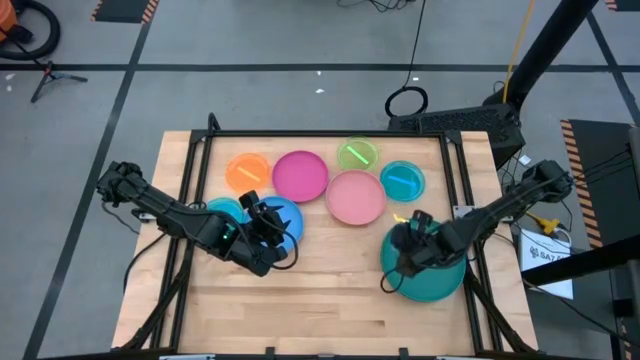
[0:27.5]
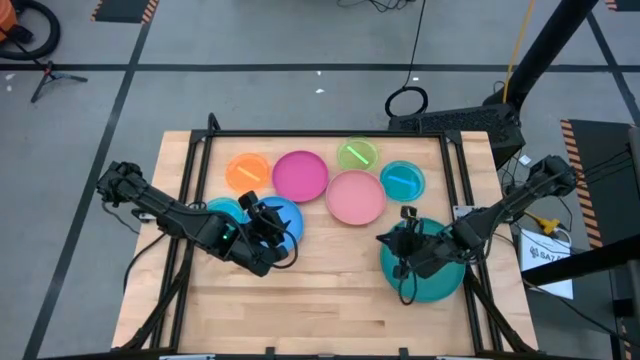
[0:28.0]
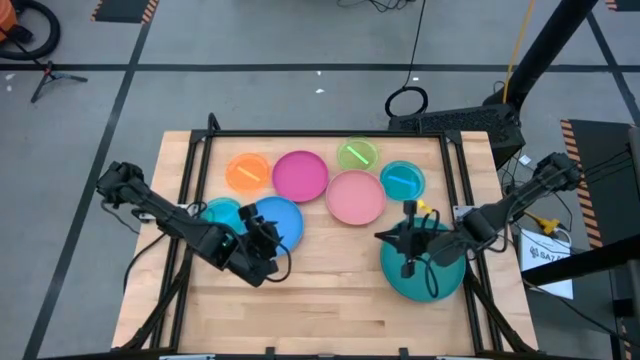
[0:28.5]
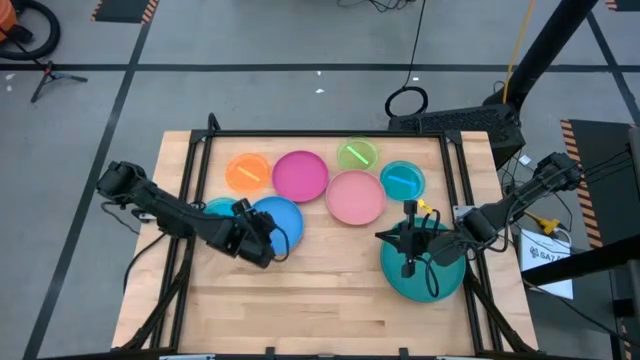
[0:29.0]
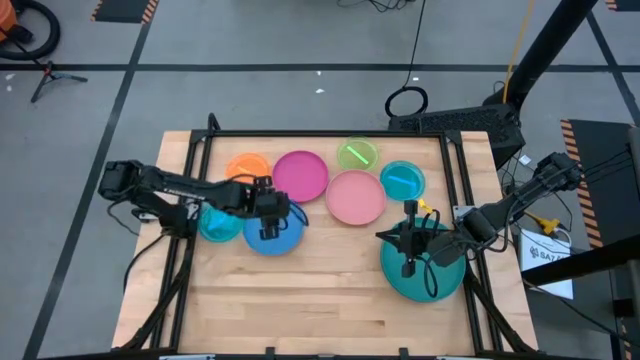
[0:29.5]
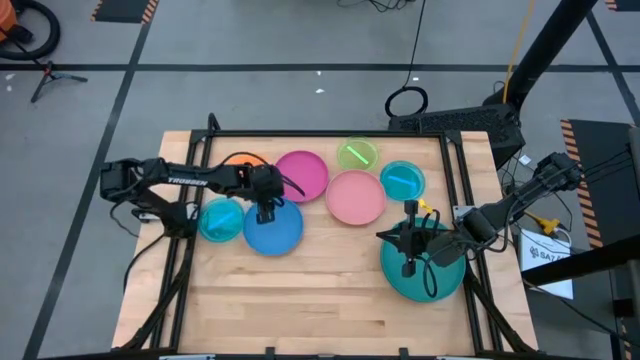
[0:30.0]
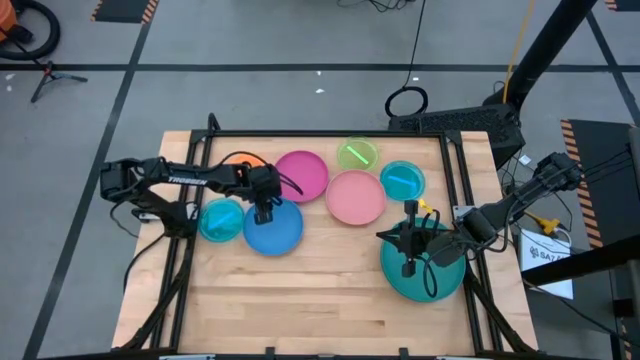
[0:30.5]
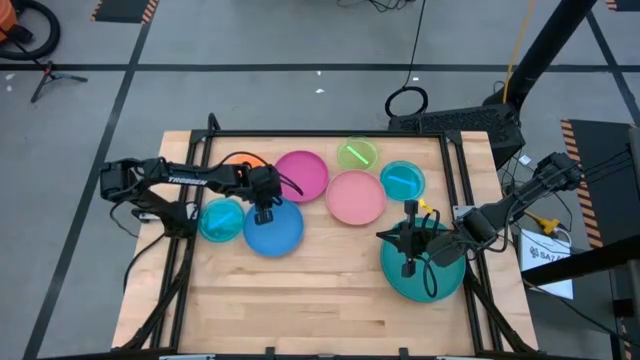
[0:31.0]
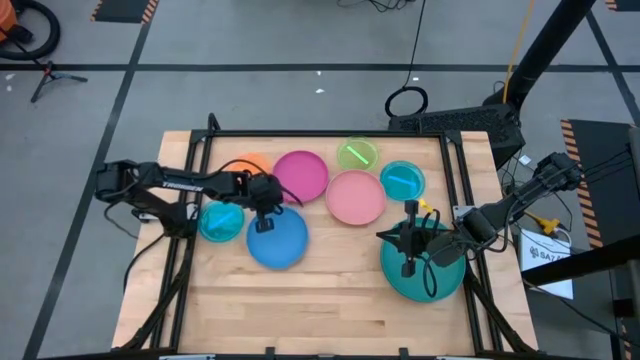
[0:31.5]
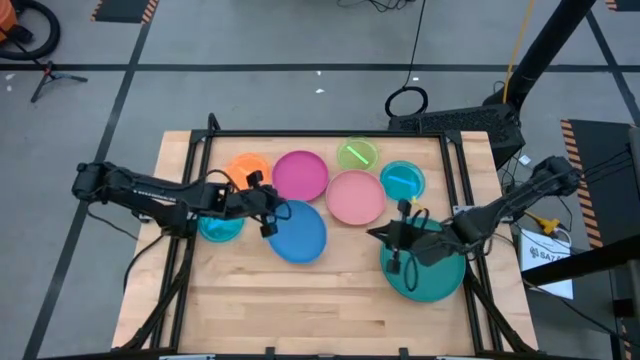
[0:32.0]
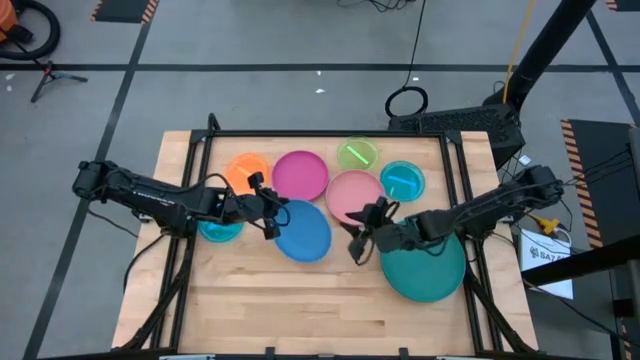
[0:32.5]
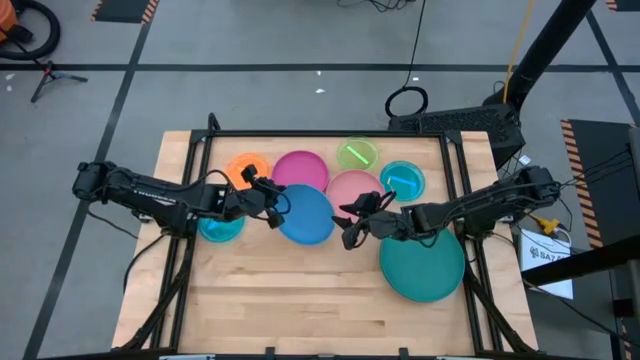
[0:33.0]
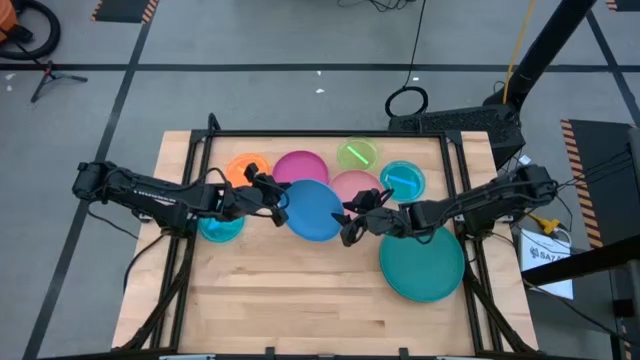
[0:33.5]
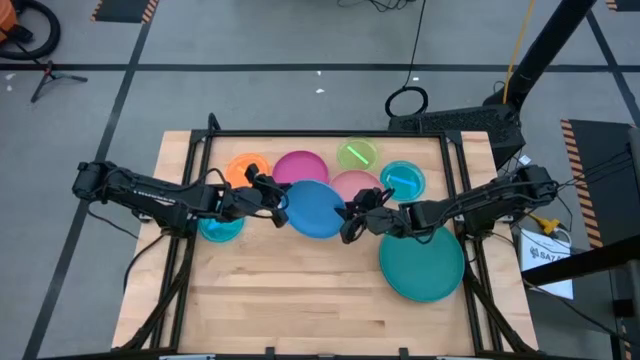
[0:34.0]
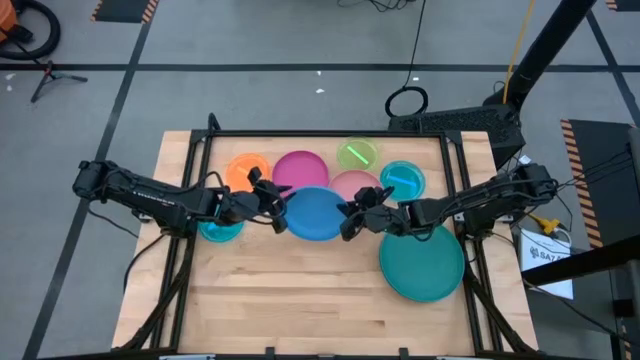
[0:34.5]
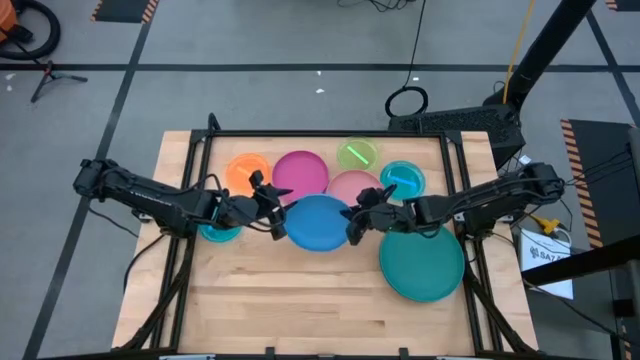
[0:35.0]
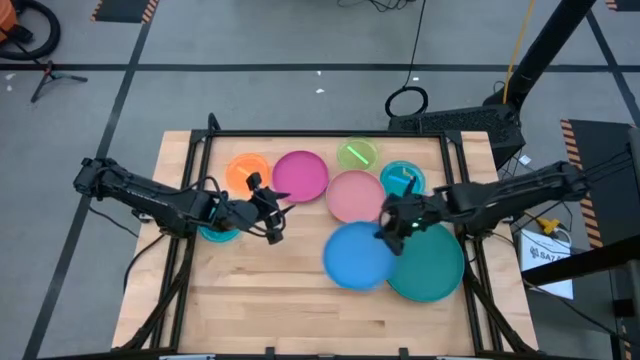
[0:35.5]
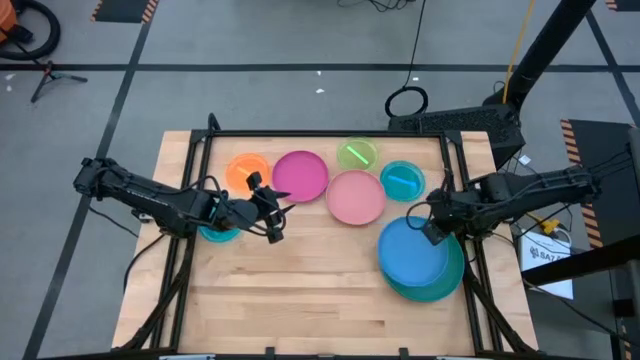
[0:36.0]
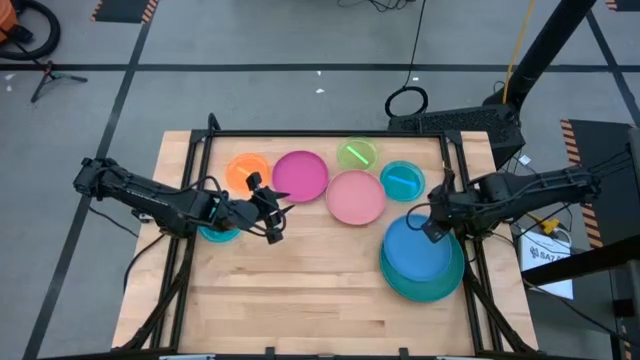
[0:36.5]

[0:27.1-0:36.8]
Task: Stack plastic plates
Stack the blue plate on top of the green plate

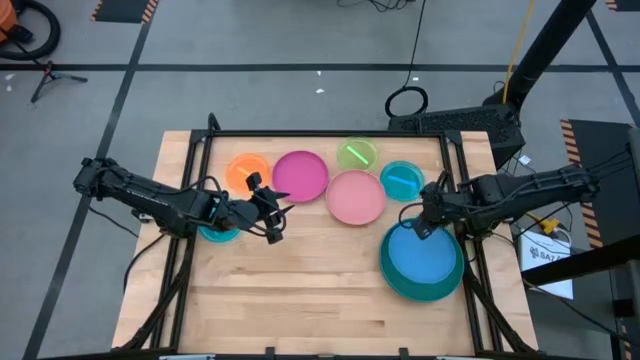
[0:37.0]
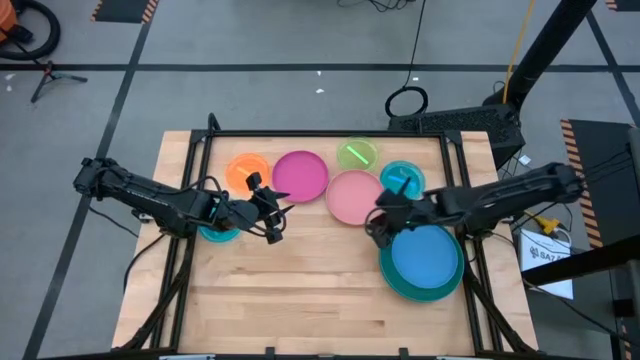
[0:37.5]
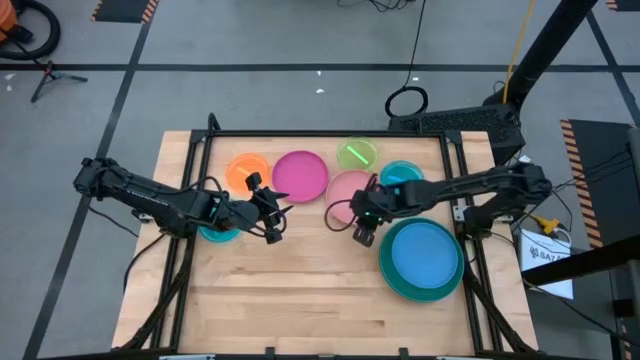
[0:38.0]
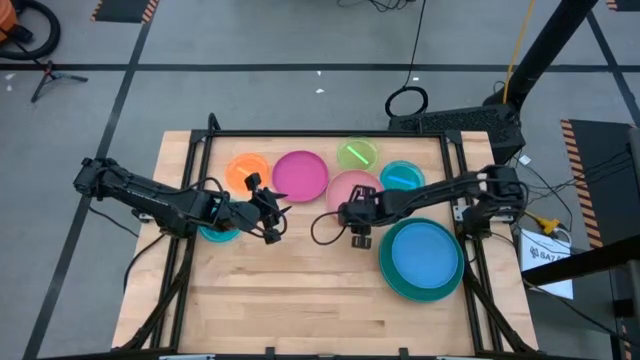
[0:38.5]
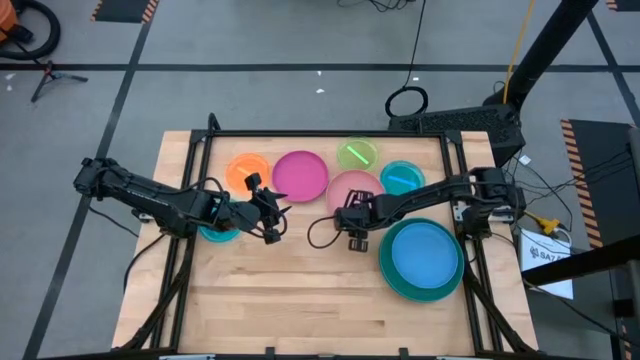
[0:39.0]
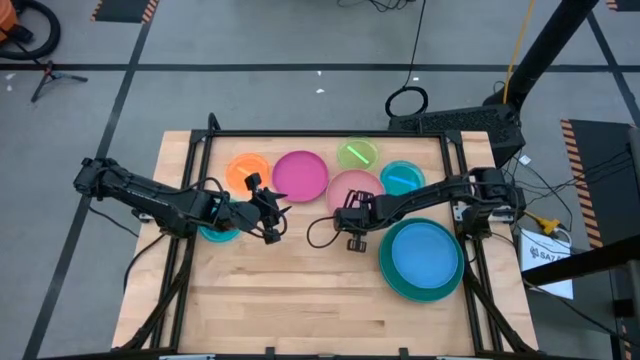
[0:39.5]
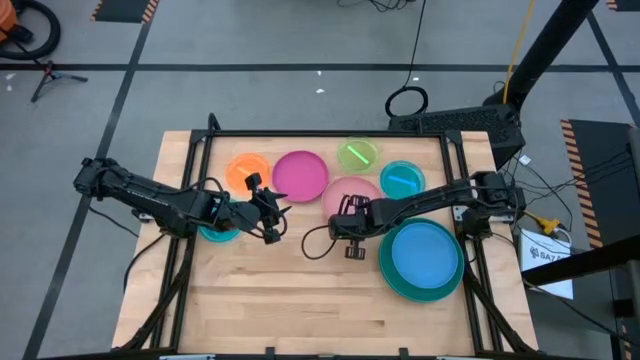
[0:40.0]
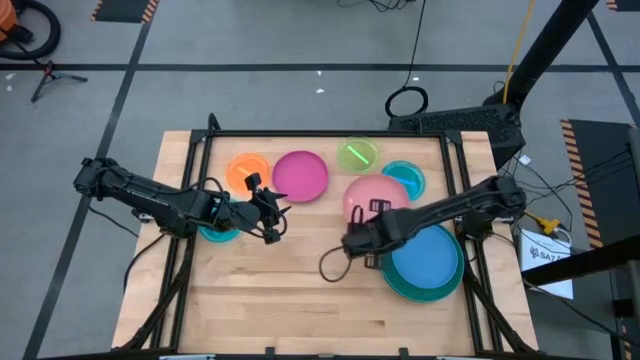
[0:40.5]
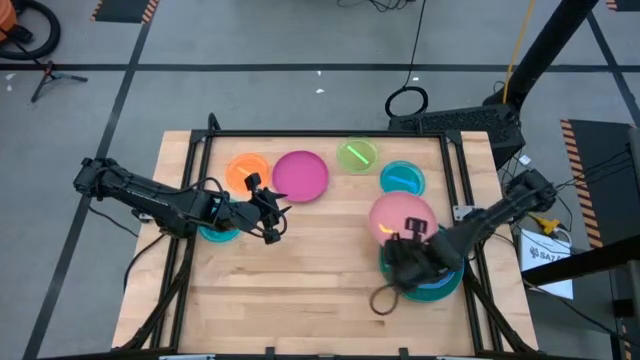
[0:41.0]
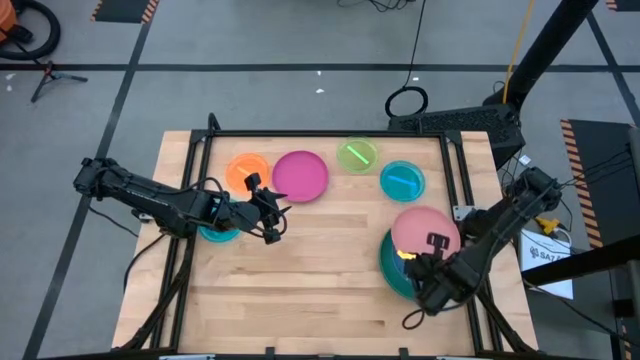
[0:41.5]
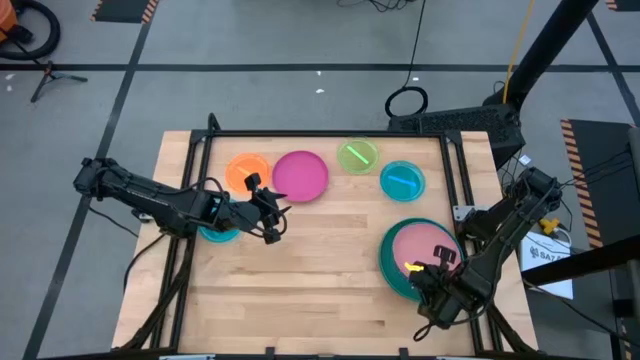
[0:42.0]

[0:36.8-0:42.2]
Stack the light pink plate on top of the blue plate

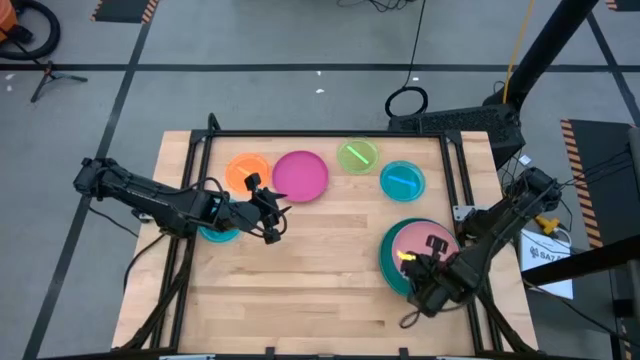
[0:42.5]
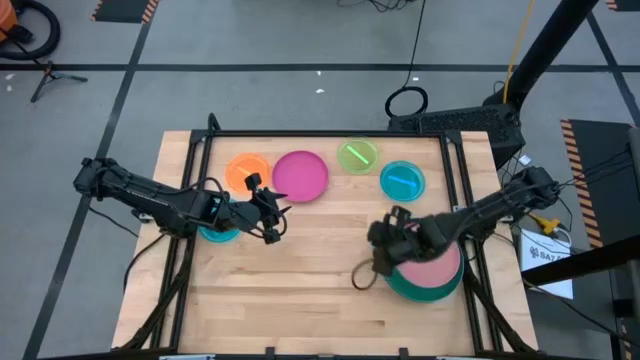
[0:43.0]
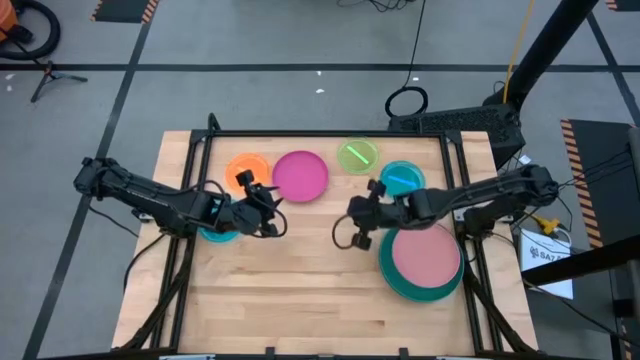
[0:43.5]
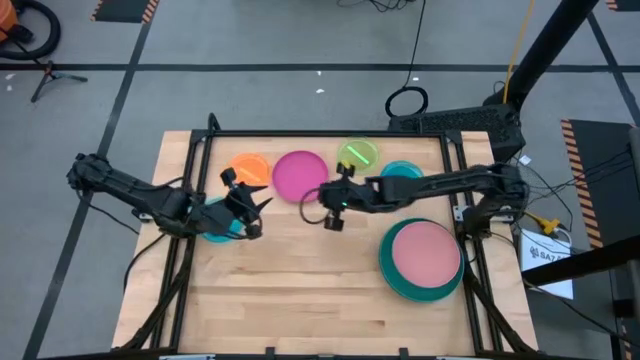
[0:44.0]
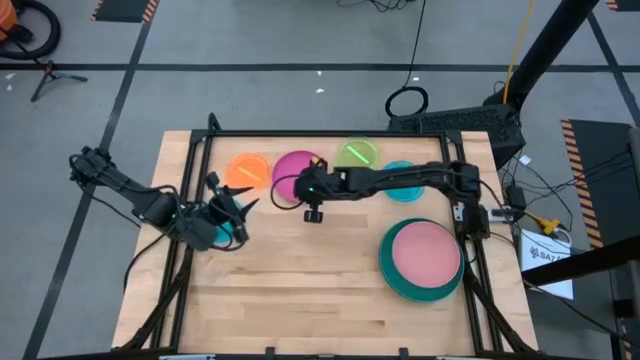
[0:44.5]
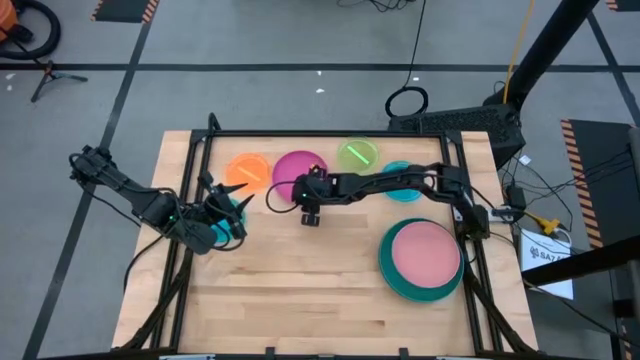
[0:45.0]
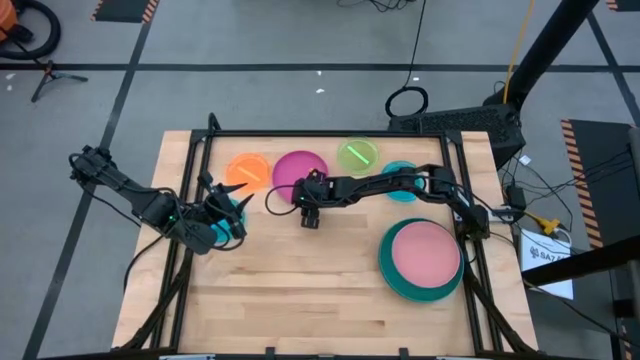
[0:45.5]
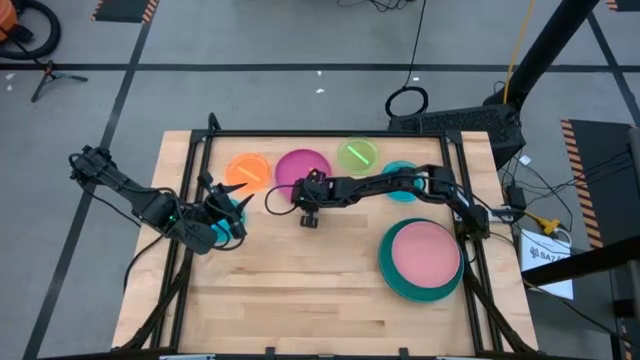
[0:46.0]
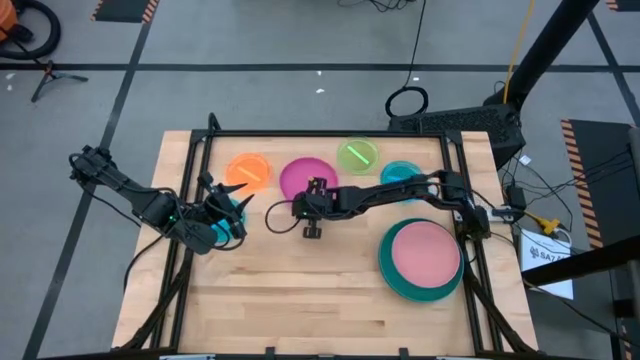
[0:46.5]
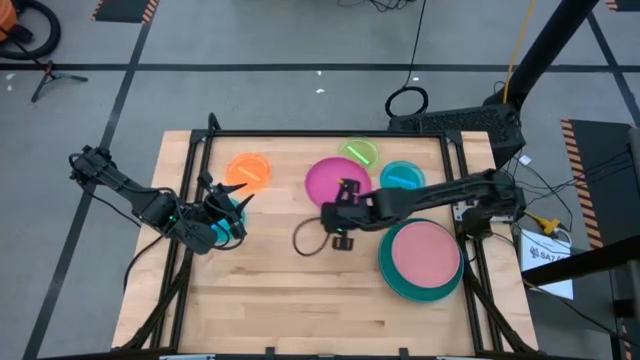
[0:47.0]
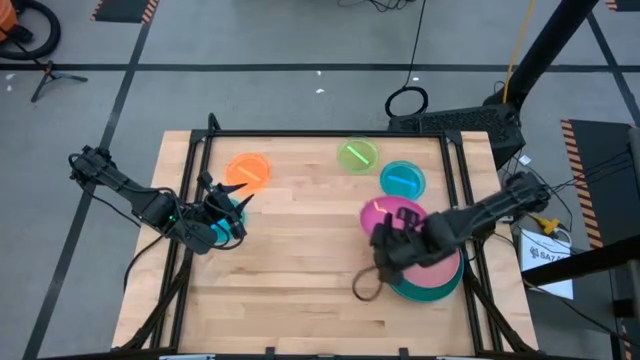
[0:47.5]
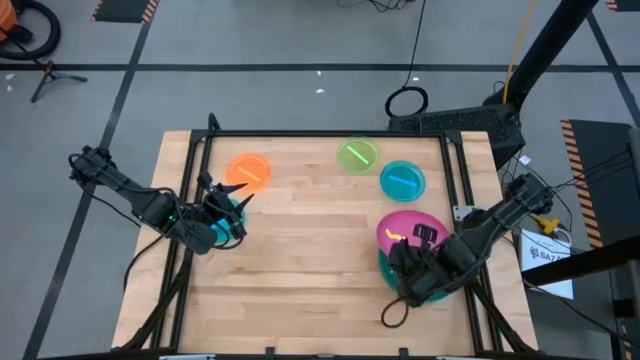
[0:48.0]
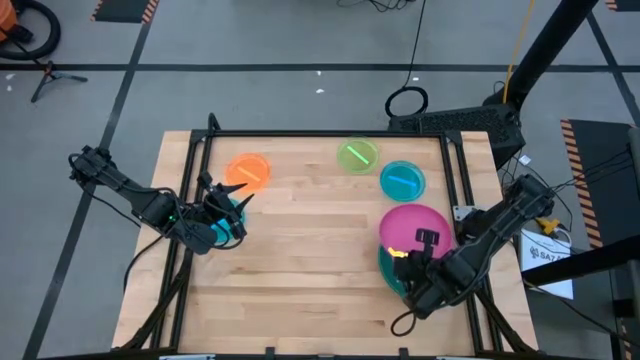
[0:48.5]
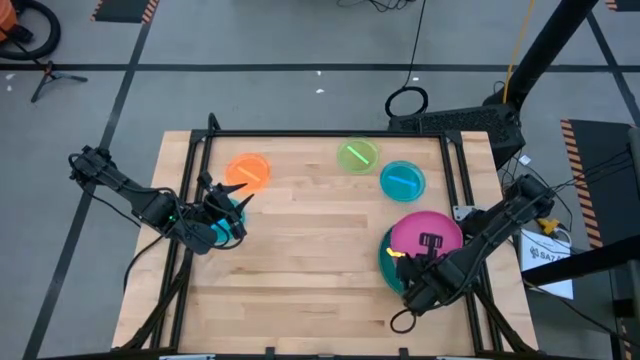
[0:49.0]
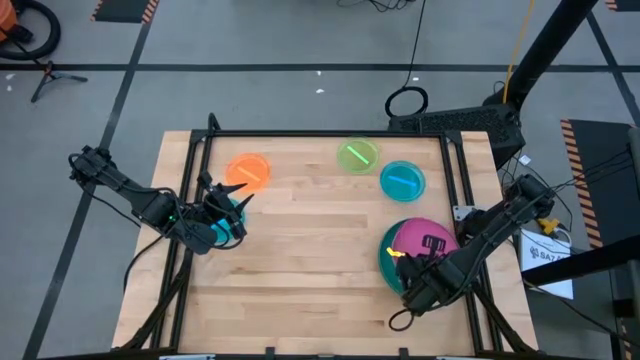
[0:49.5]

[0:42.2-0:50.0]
Stack the pink plate on top of the light pink plate
